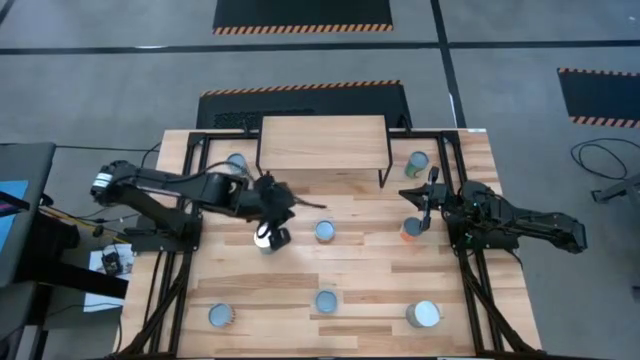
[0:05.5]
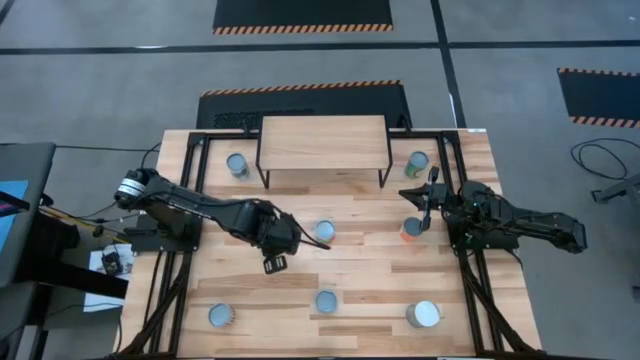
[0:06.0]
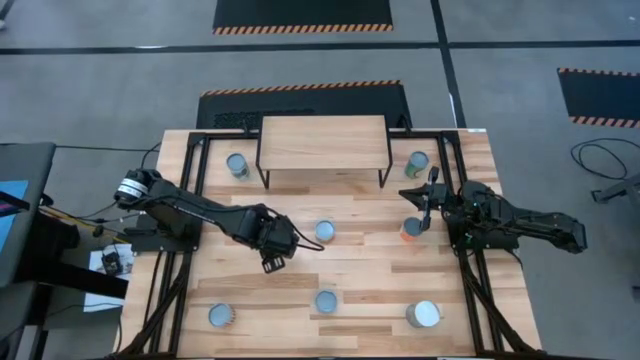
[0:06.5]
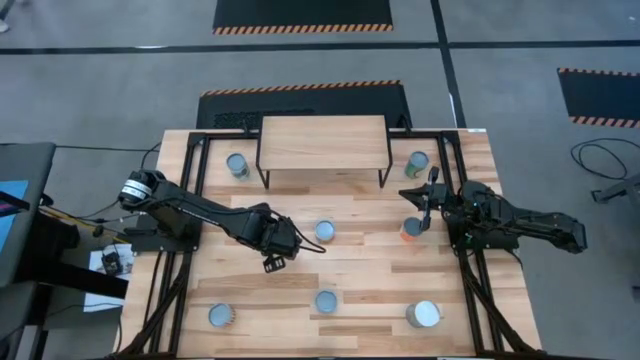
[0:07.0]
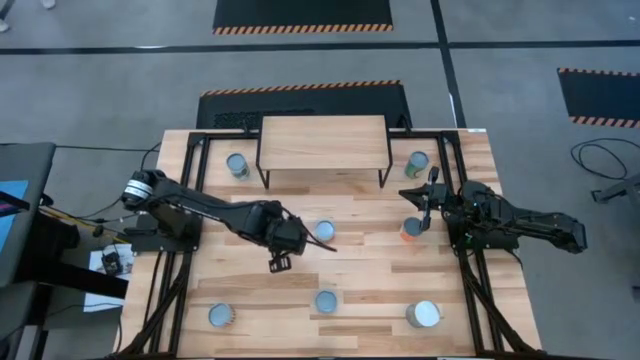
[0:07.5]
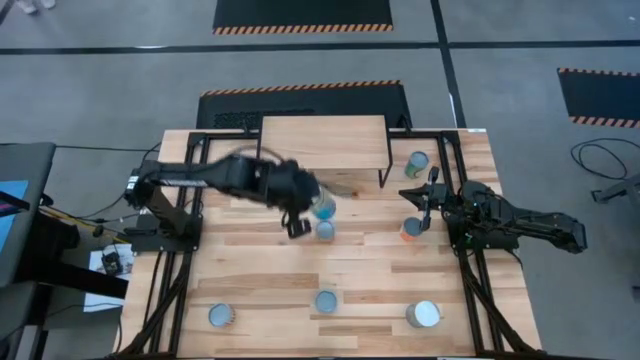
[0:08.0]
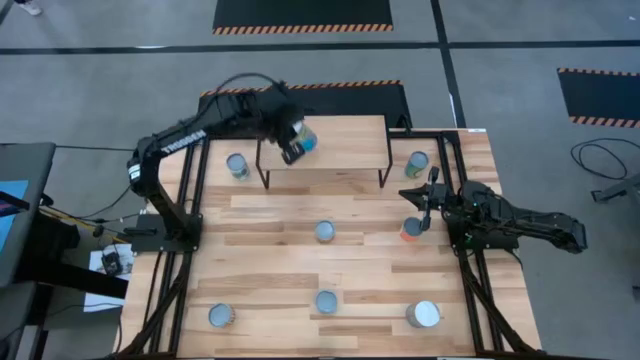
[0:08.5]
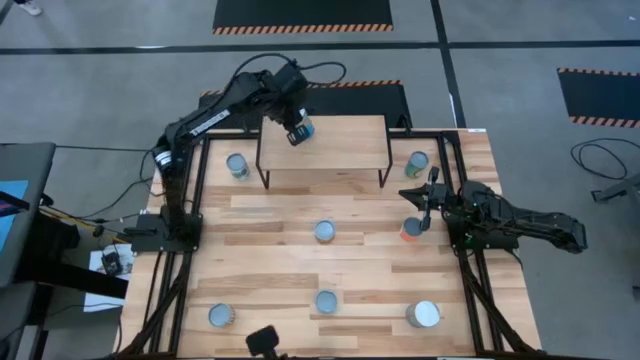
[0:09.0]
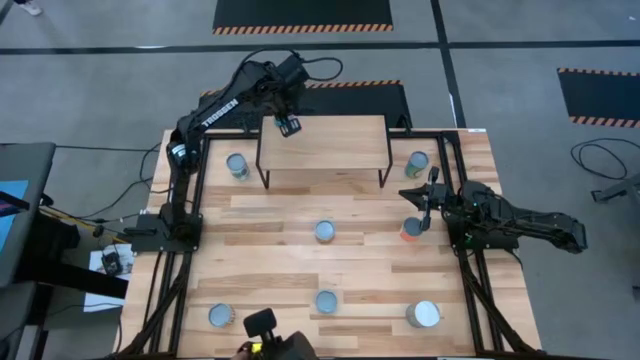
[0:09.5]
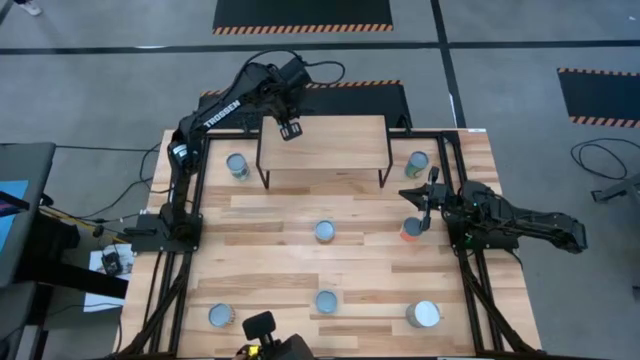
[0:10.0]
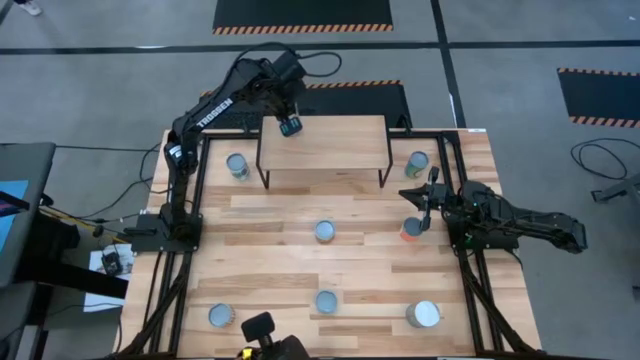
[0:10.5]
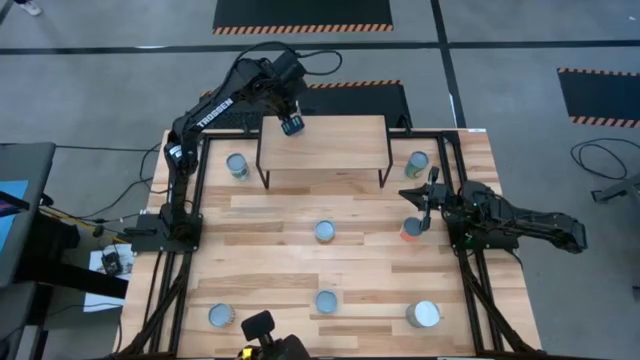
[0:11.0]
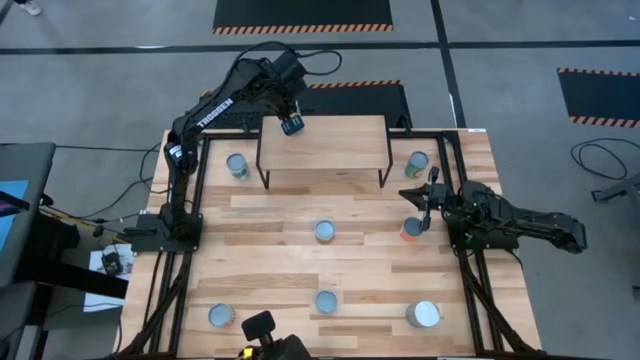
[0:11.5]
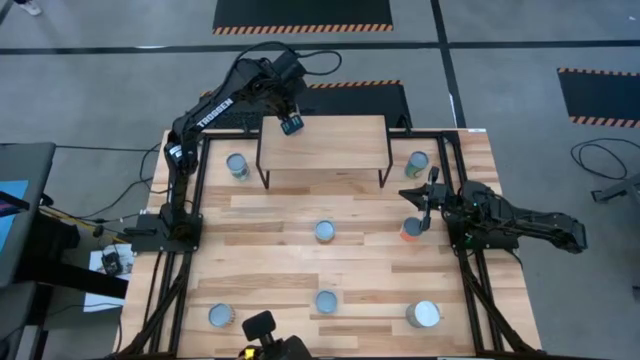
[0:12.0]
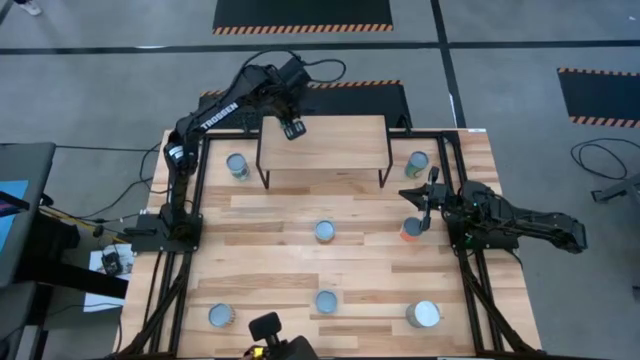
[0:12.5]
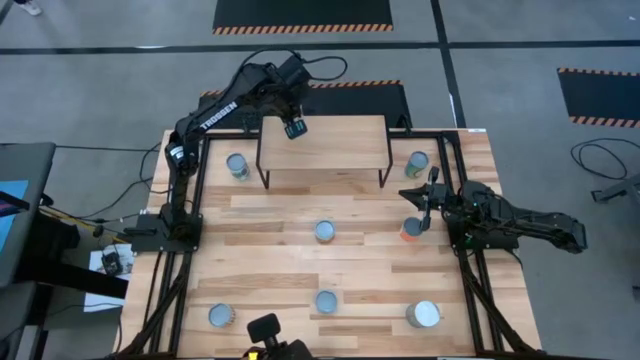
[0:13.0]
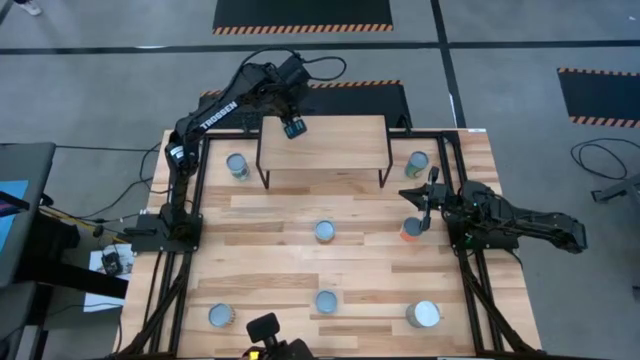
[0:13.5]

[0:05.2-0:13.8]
Task: Pick and place cans onto a shelf
Put the top canned cherries on the shelf

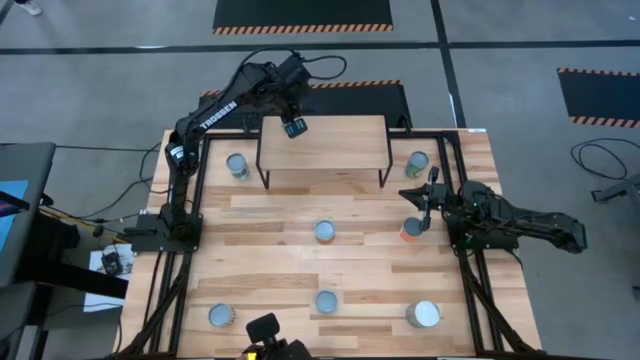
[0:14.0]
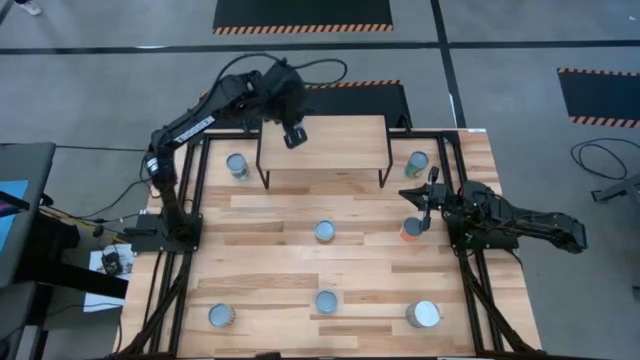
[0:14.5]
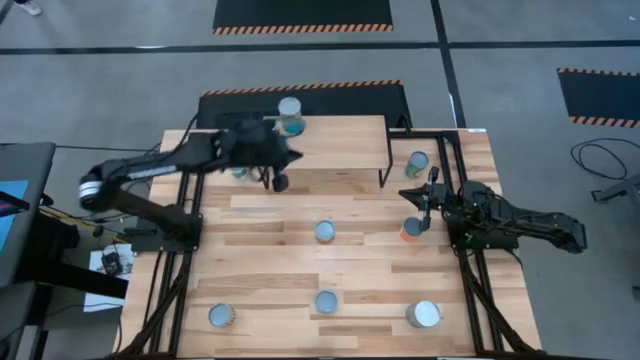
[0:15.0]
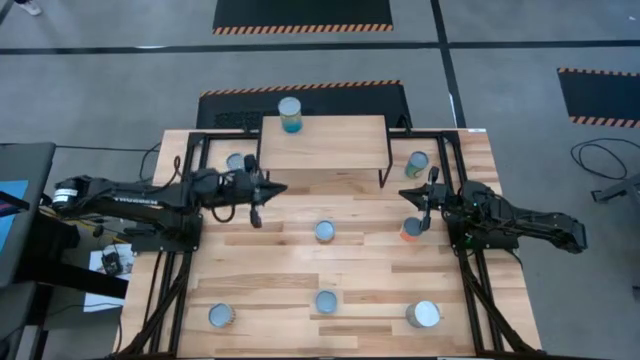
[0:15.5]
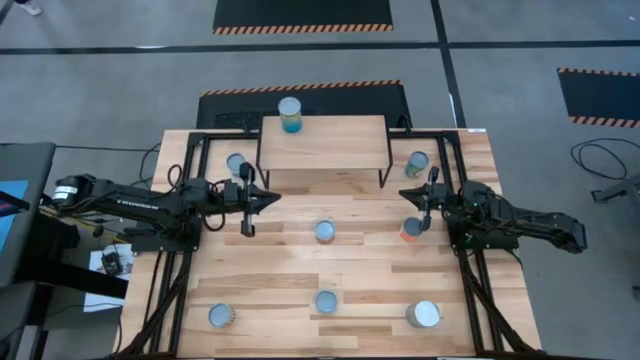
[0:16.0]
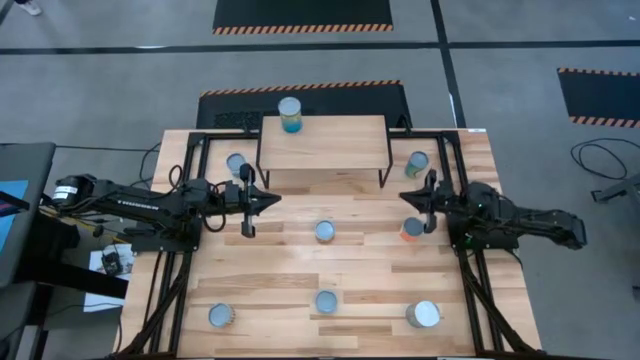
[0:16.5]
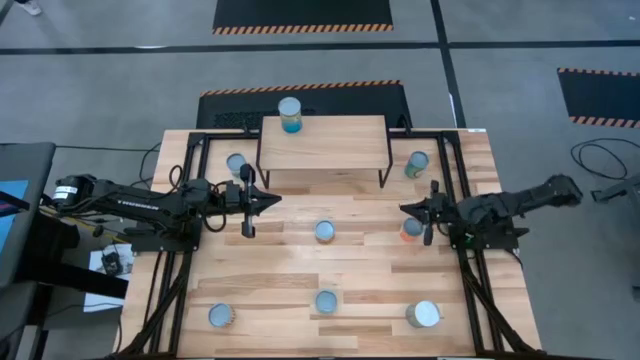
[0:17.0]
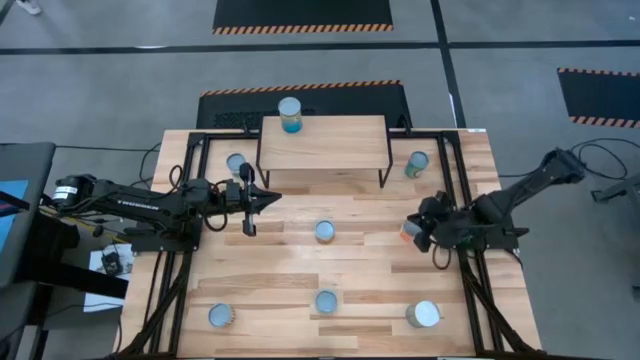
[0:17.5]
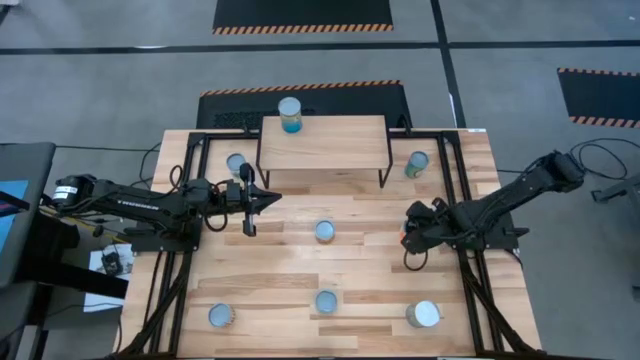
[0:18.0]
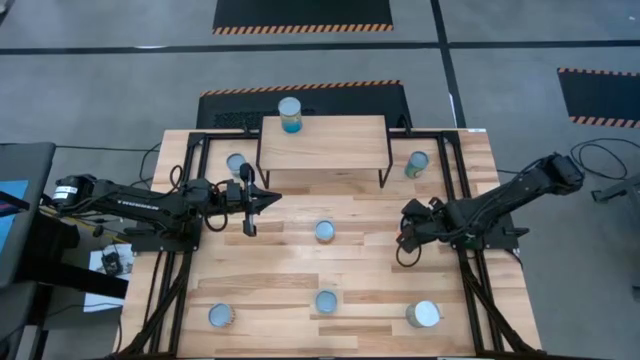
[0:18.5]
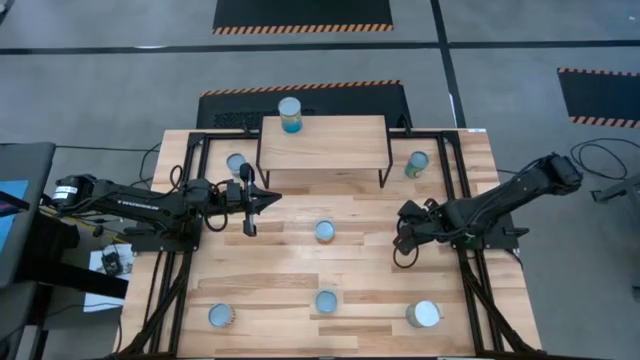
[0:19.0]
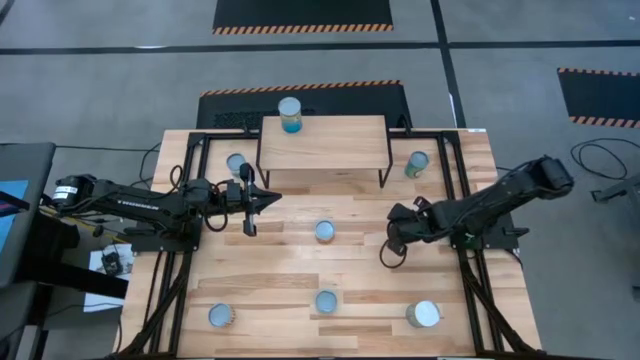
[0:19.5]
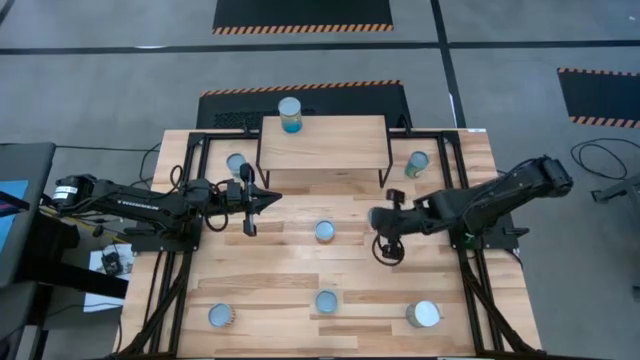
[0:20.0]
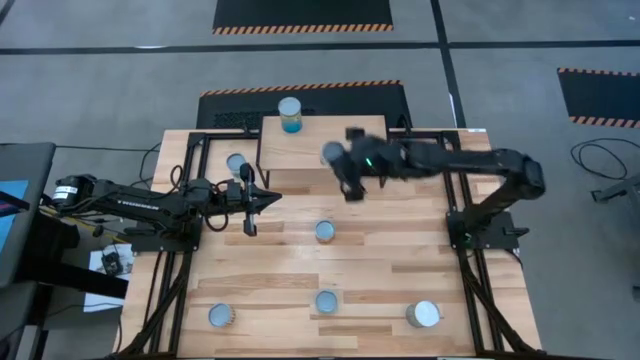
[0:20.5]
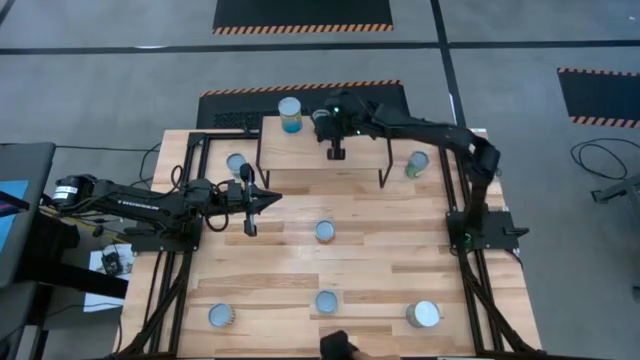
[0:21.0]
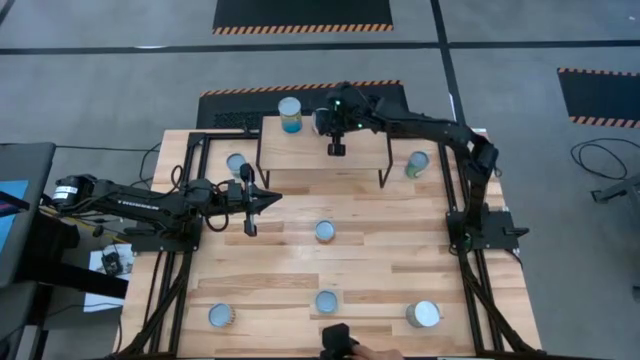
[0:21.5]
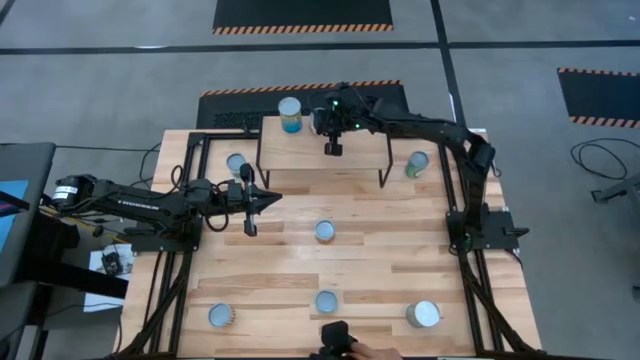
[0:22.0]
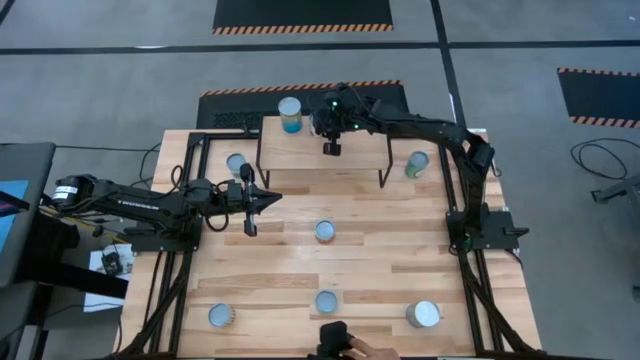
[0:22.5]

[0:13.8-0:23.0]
Put the canned meatballs on the shelf

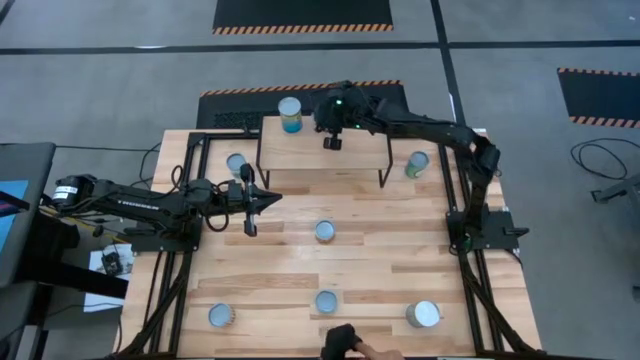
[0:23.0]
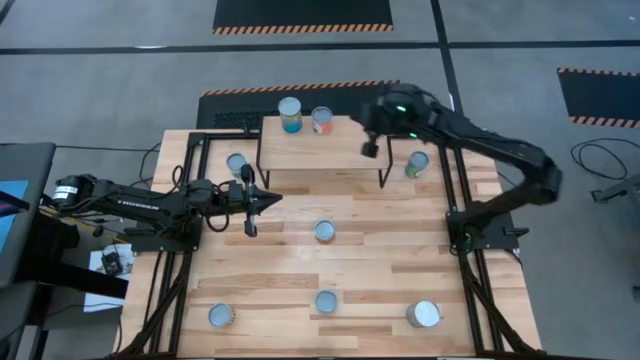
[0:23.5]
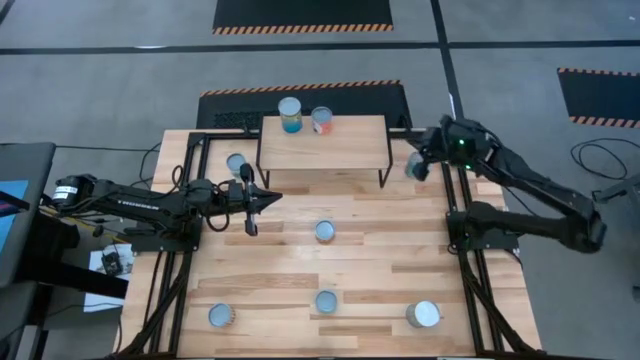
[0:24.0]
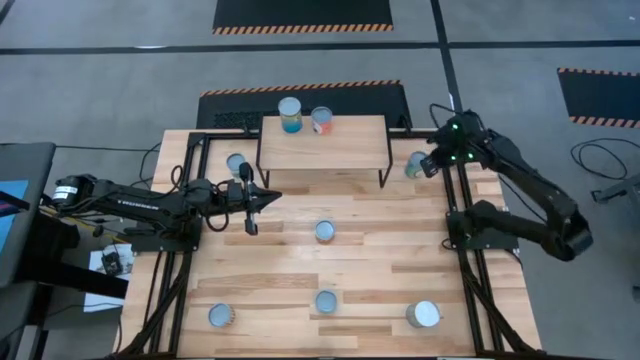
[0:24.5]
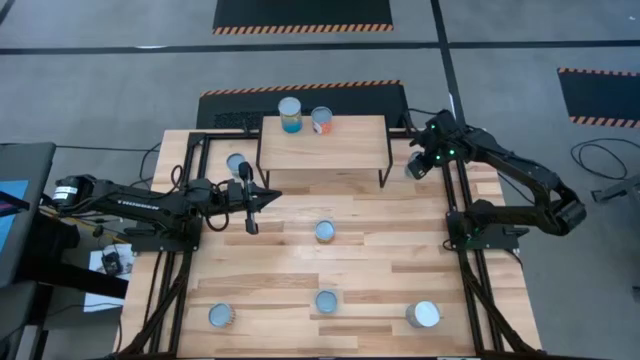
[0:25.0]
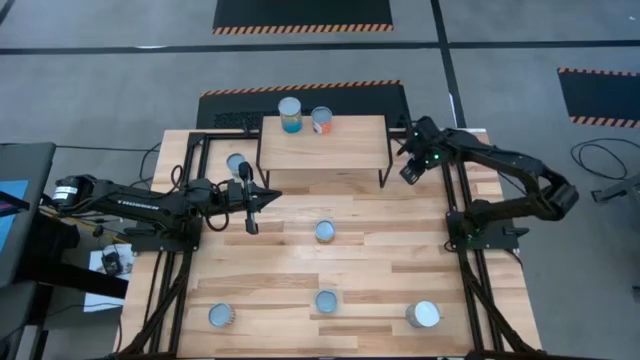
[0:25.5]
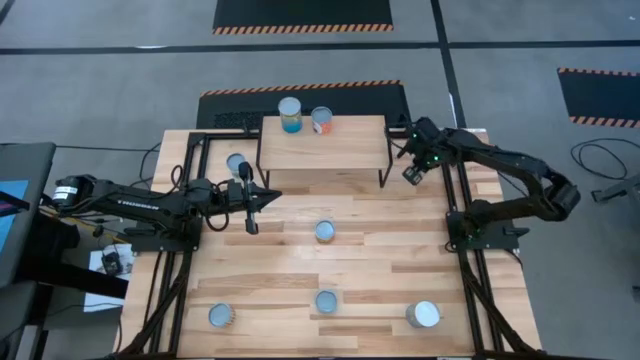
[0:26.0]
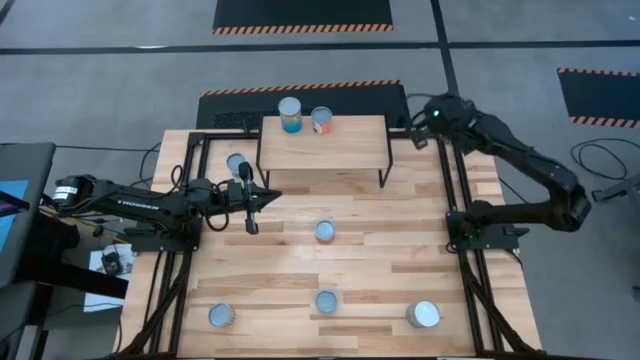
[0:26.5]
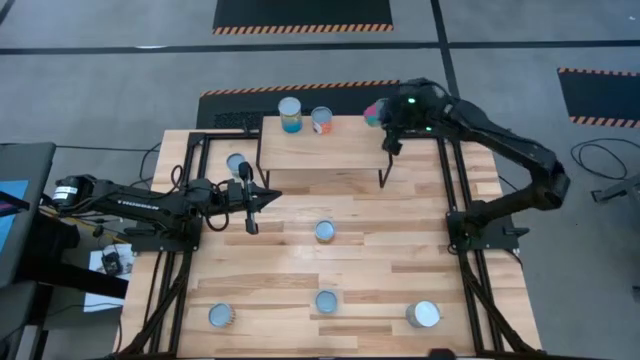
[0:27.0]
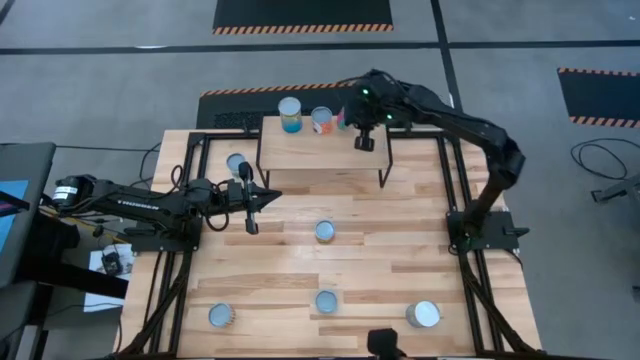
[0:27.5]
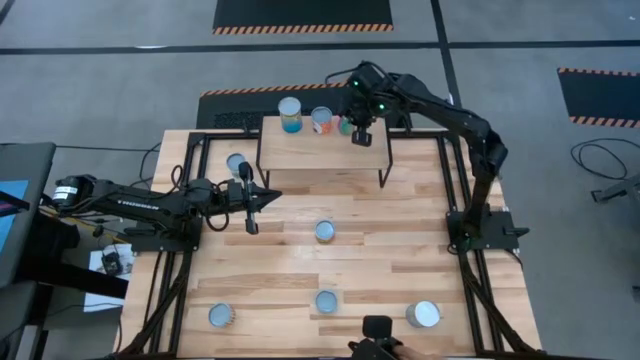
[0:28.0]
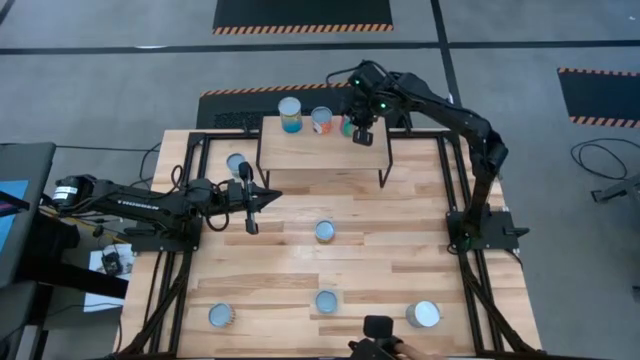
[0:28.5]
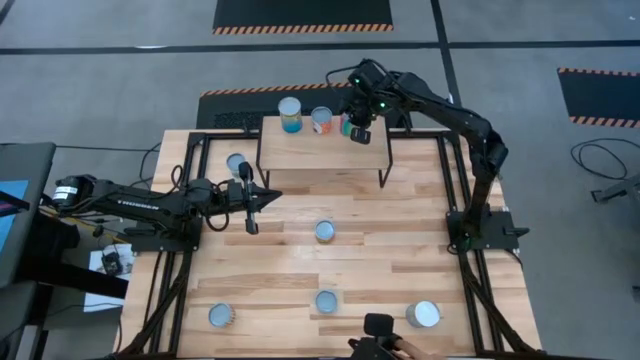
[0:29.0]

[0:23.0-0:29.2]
Put the canned chicken soup on the shelf
